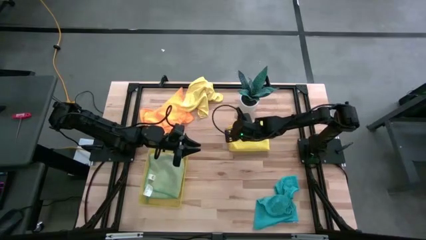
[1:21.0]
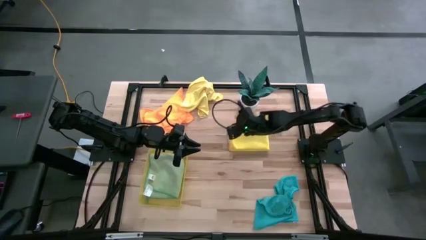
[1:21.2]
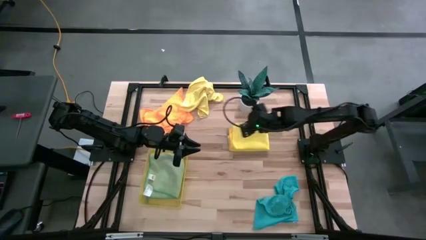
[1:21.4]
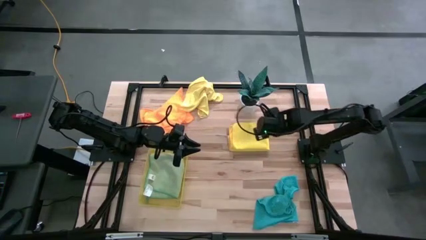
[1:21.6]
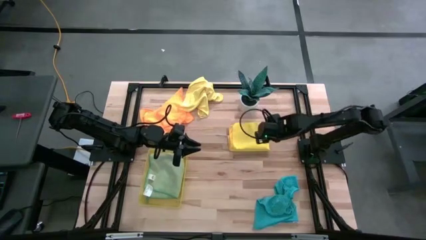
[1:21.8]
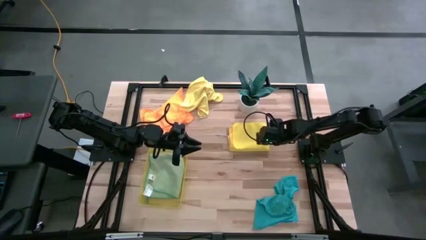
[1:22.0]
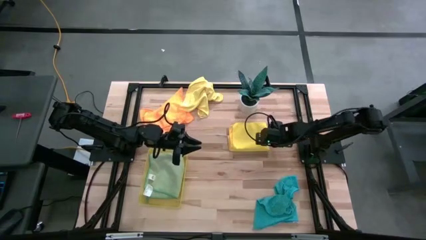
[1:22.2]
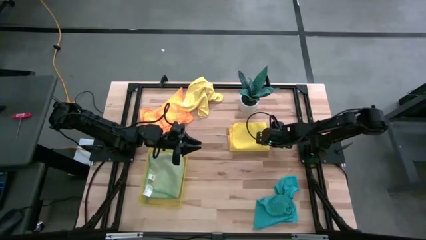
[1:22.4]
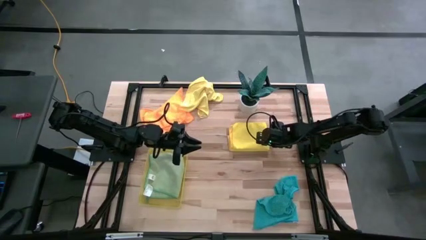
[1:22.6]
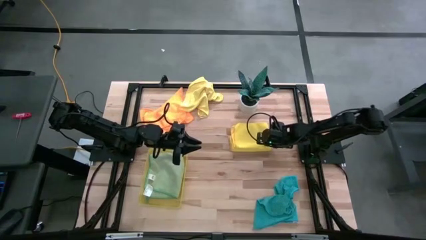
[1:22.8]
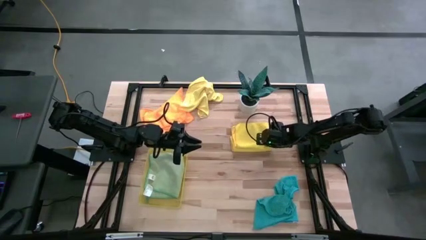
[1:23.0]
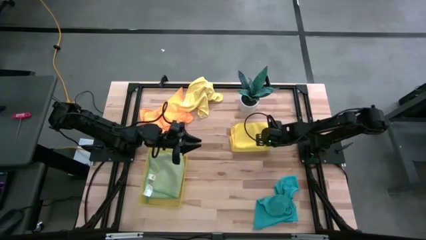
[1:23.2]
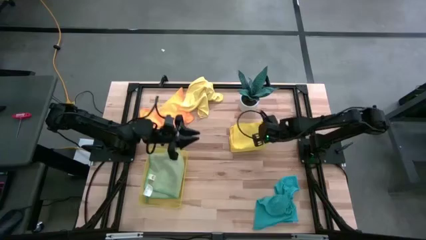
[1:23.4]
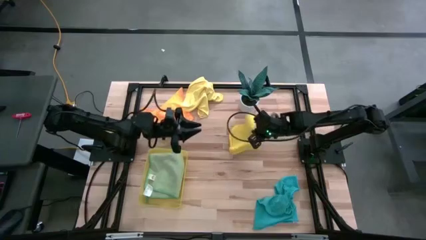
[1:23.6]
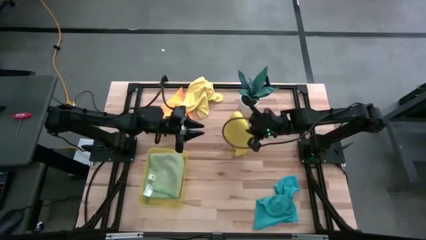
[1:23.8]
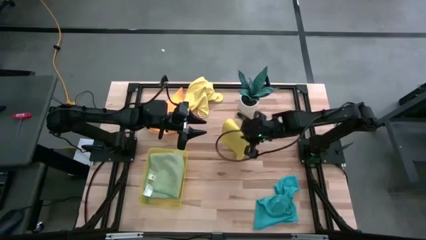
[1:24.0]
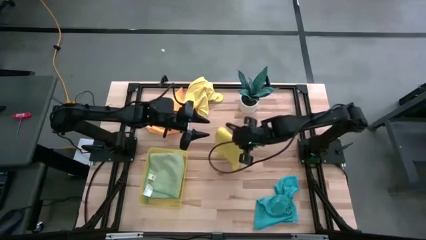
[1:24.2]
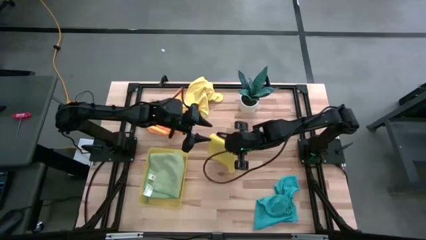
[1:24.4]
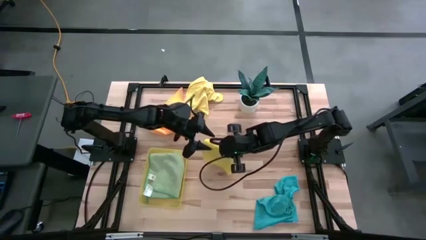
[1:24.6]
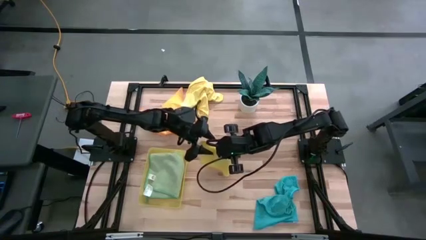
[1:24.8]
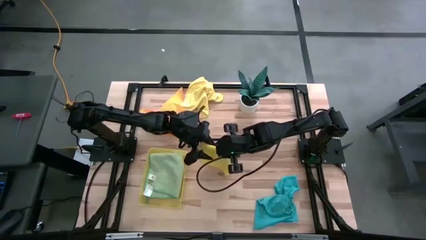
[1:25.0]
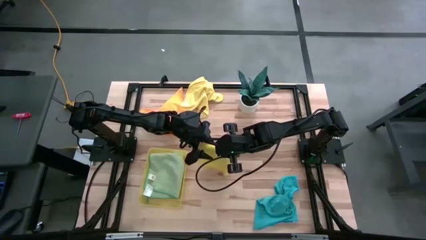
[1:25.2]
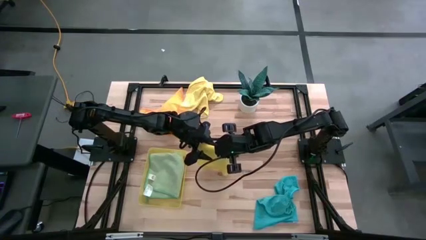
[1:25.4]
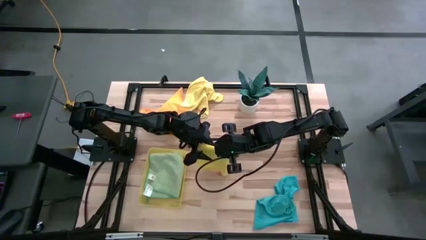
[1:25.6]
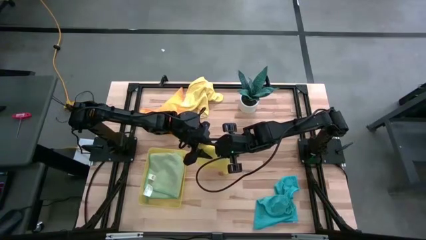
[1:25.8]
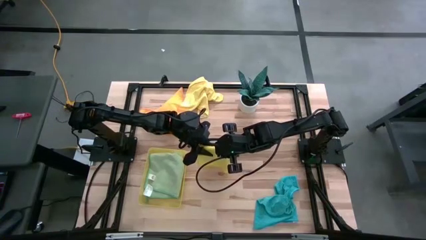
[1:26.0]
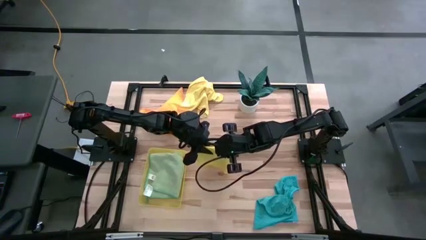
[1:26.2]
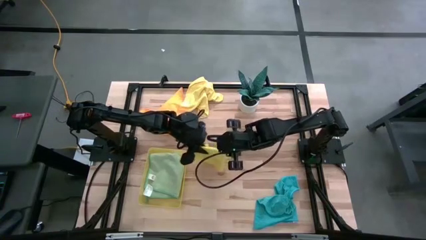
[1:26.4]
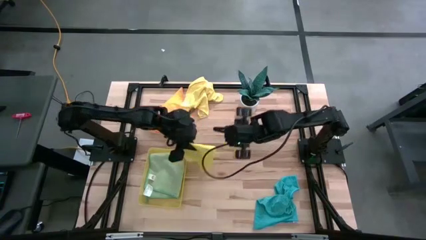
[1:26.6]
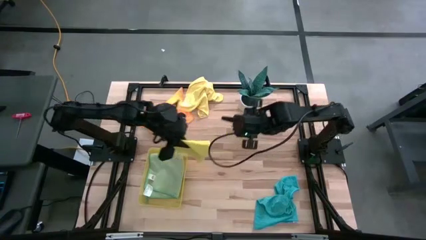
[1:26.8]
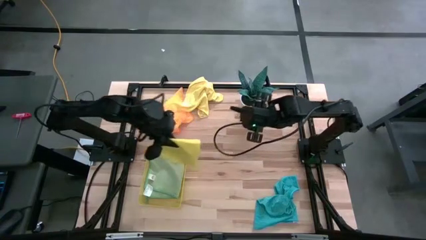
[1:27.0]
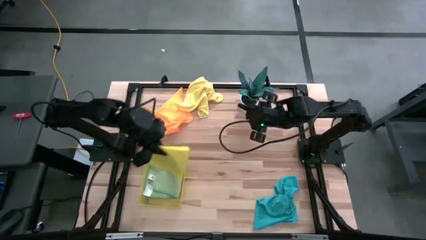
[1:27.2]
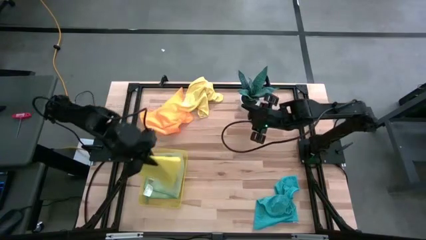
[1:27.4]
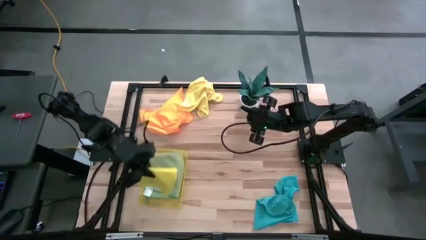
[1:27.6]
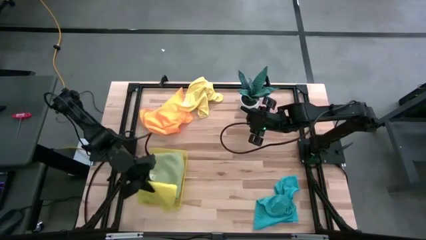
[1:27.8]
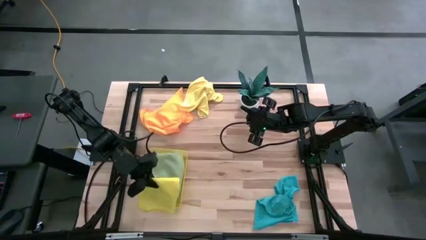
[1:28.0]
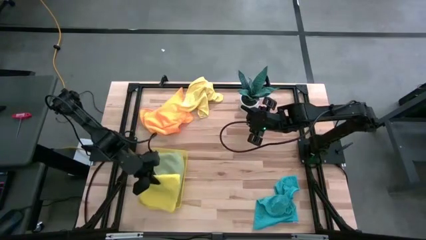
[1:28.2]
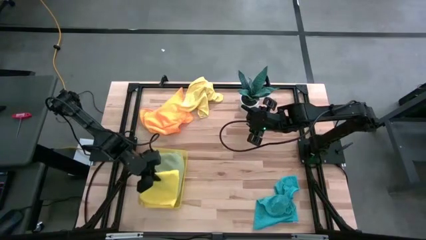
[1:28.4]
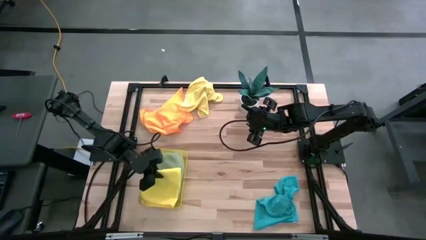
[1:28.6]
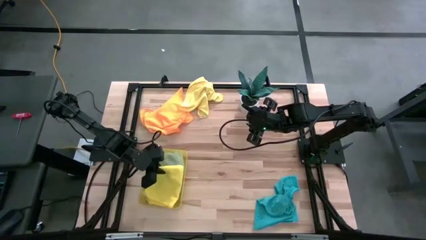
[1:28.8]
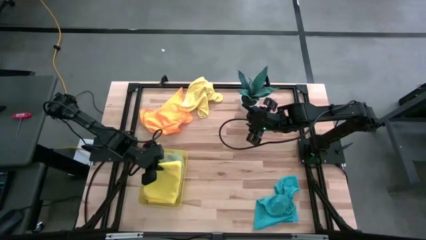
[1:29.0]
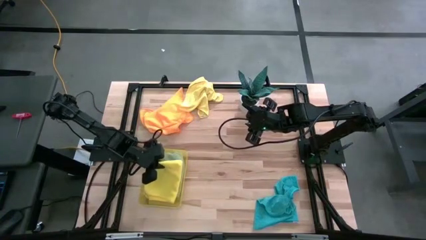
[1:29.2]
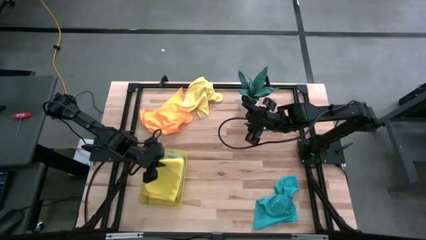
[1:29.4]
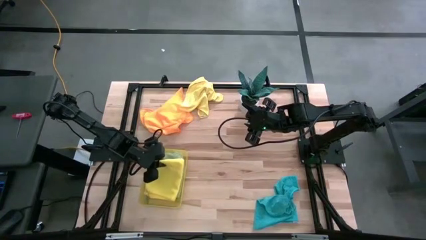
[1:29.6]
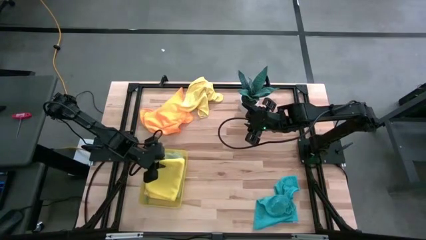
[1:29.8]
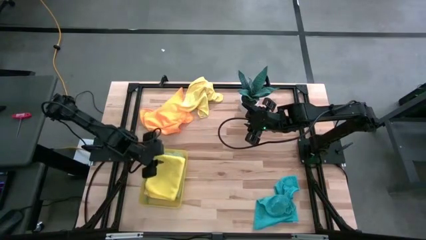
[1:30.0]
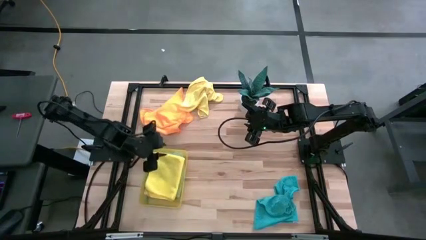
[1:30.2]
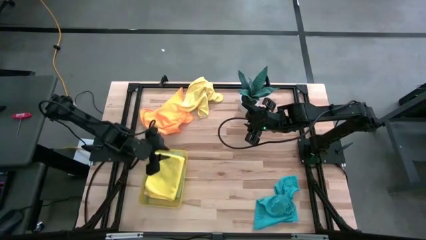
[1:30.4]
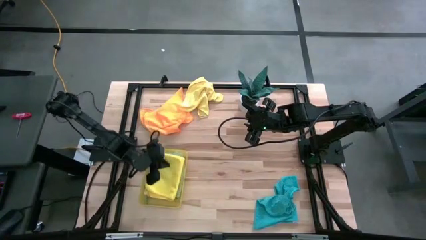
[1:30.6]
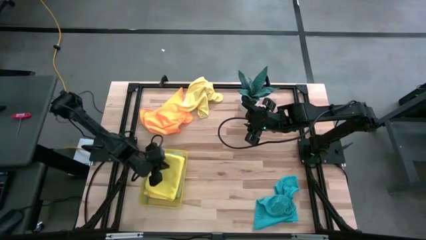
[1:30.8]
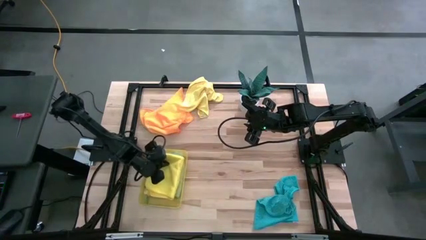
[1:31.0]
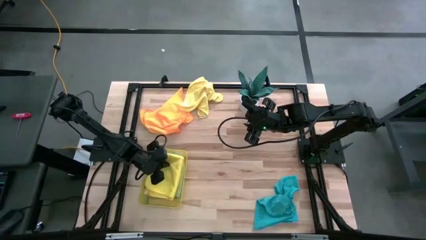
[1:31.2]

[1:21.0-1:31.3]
Task: Fold microfiber towels
Stack the bottom yellow microfiber cloth on top of the green microfiber cloth

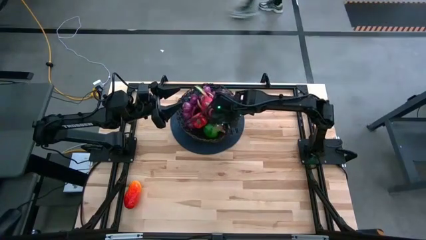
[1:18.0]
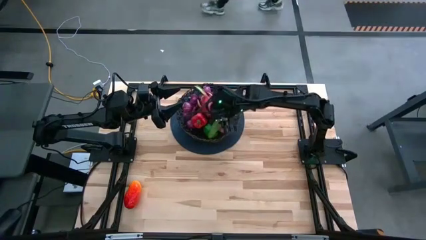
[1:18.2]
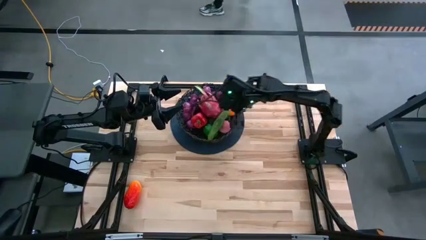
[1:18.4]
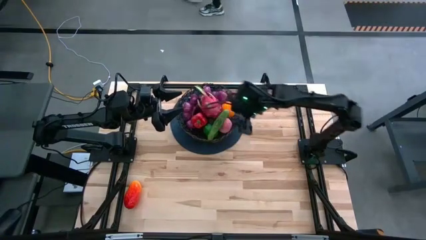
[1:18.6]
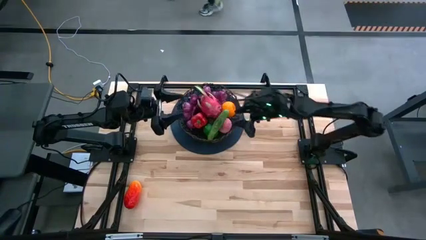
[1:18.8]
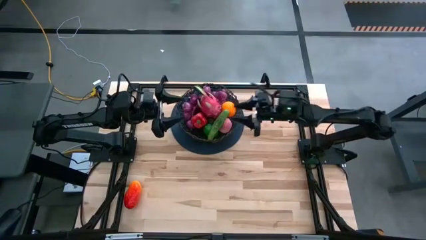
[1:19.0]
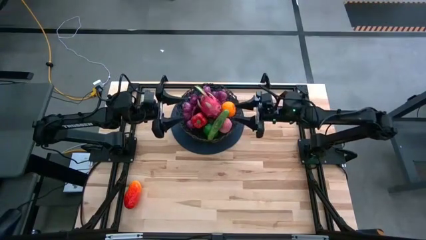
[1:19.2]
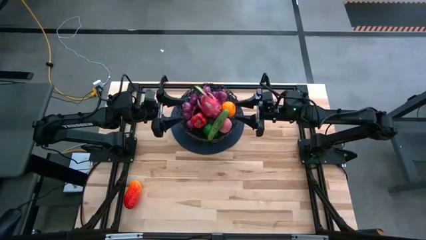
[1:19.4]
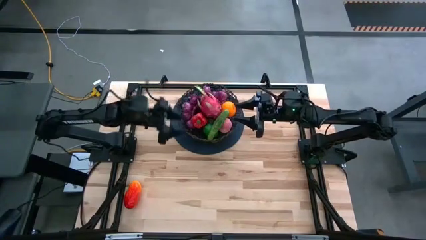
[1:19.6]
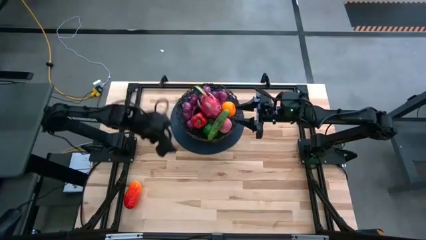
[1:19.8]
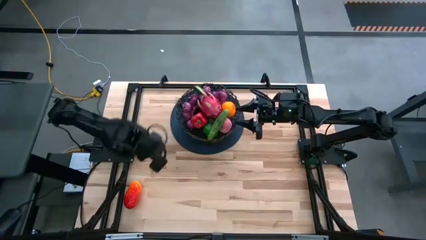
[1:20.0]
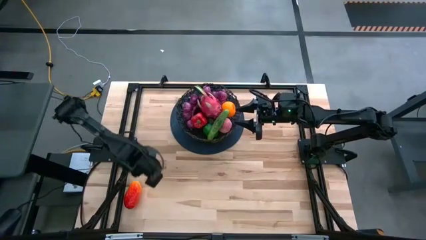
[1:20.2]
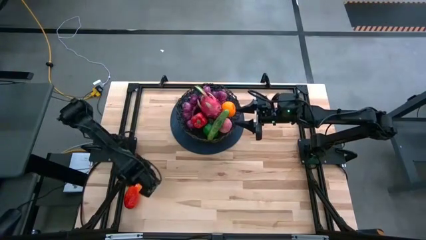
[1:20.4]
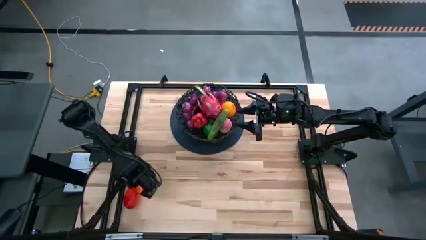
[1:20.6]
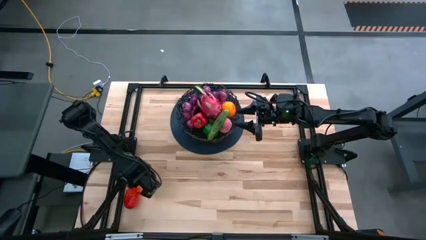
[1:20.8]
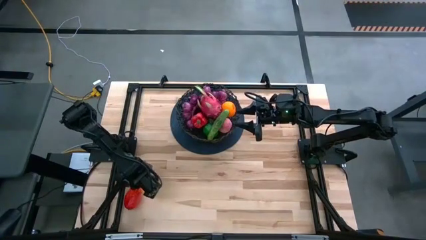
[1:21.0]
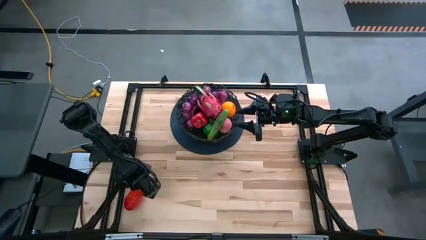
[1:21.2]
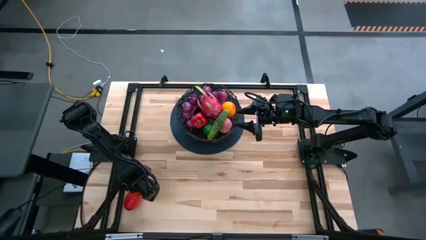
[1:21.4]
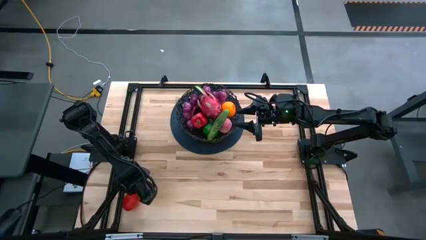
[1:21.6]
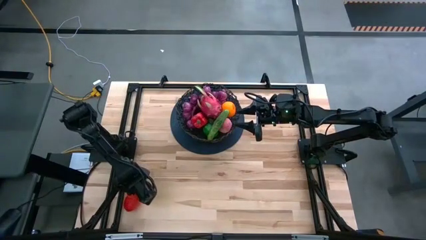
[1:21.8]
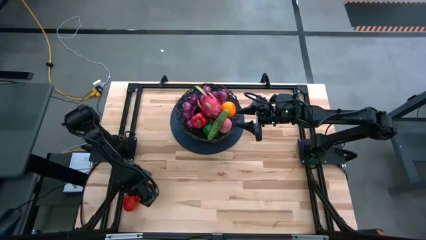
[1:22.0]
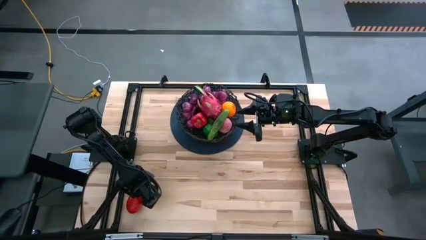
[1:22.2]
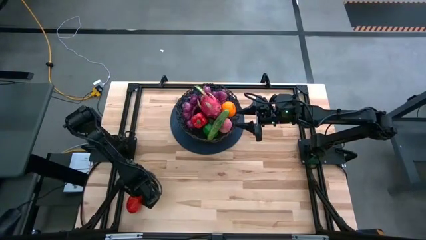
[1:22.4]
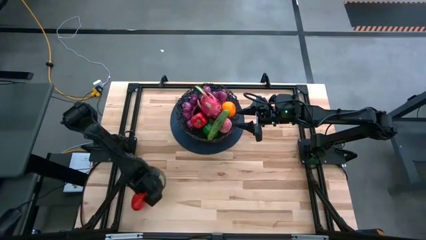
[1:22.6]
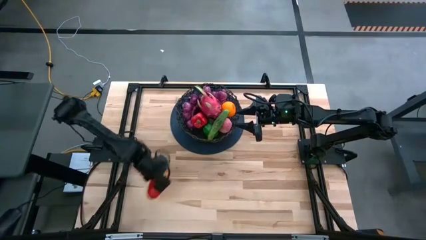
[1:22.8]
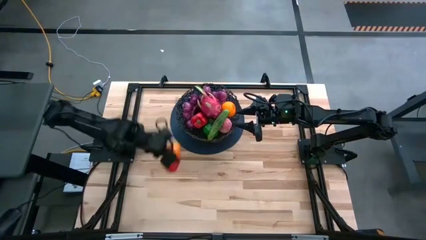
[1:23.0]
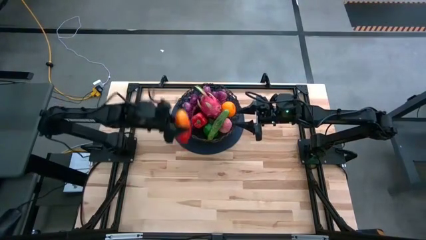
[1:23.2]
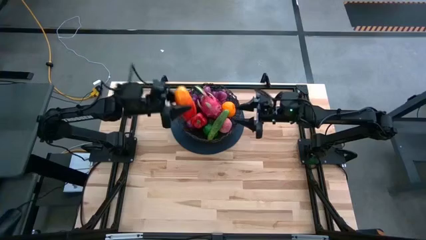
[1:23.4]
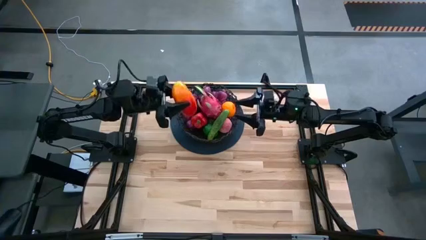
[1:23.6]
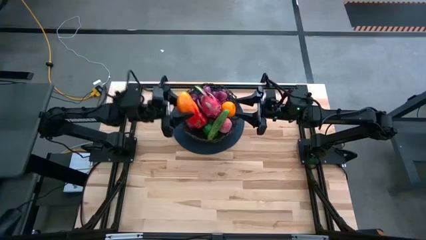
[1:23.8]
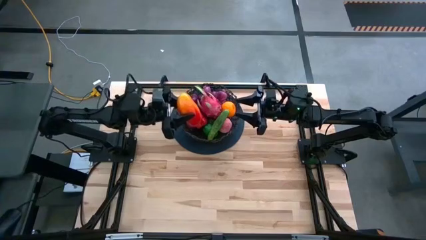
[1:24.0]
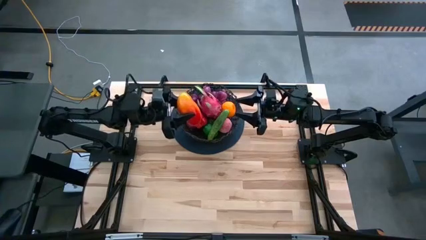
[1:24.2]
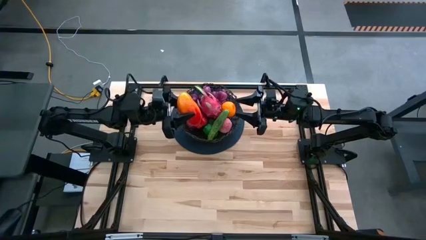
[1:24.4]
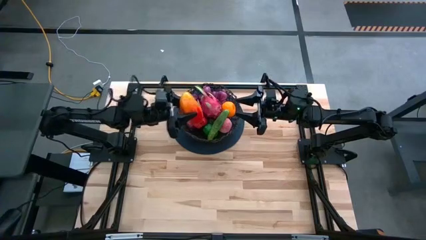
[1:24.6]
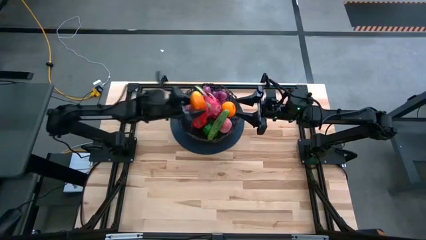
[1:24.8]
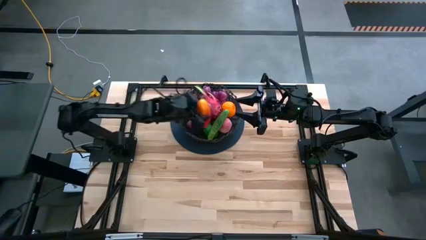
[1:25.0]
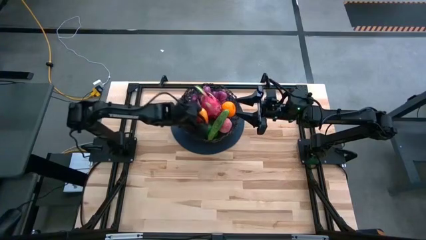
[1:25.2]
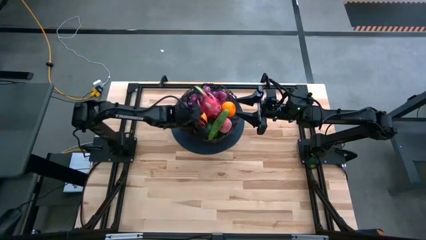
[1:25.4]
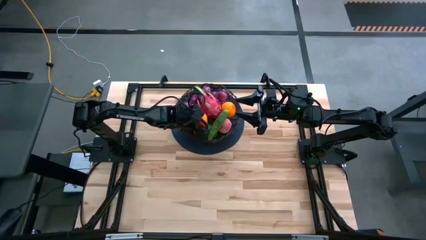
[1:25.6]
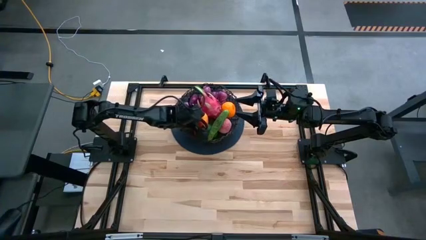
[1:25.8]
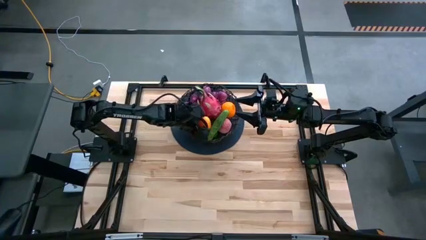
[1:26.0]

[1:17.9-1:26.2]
Task: Build produce basket
Put the mango into the wire basket
